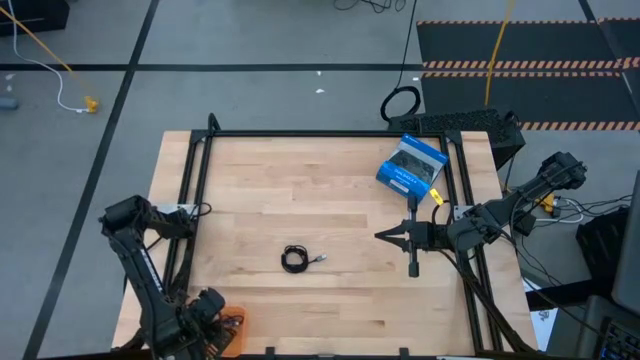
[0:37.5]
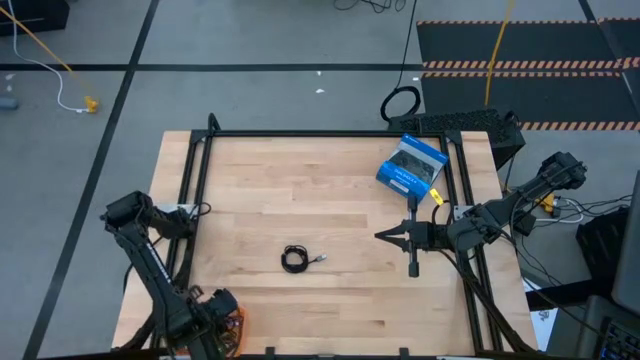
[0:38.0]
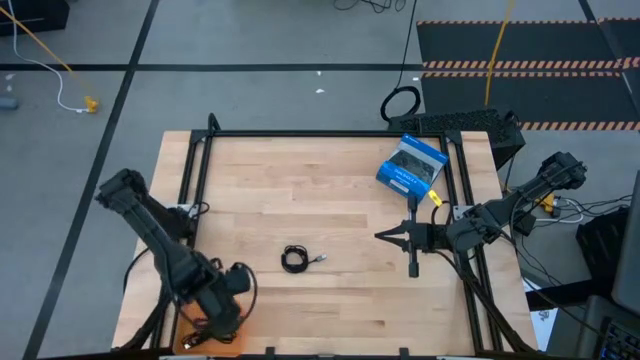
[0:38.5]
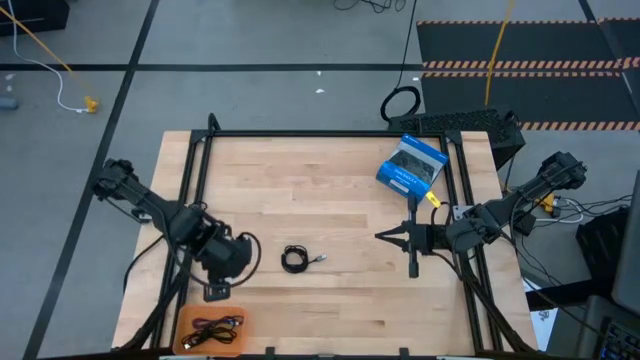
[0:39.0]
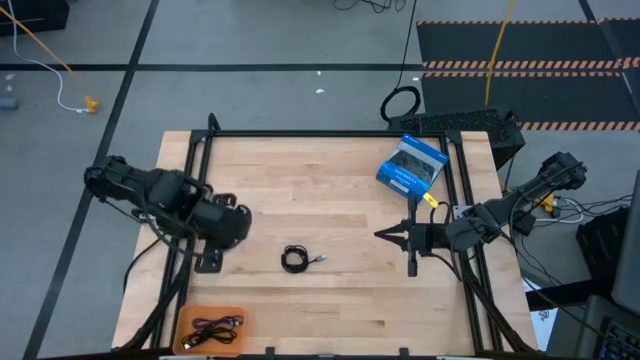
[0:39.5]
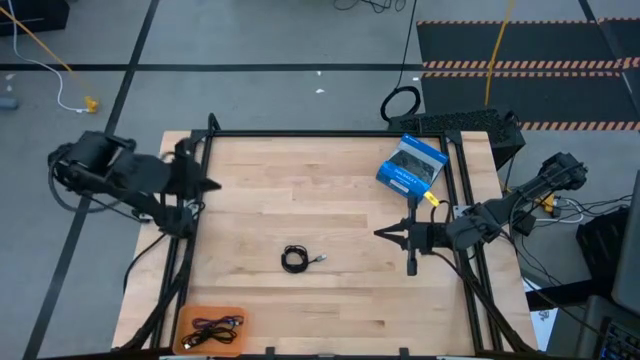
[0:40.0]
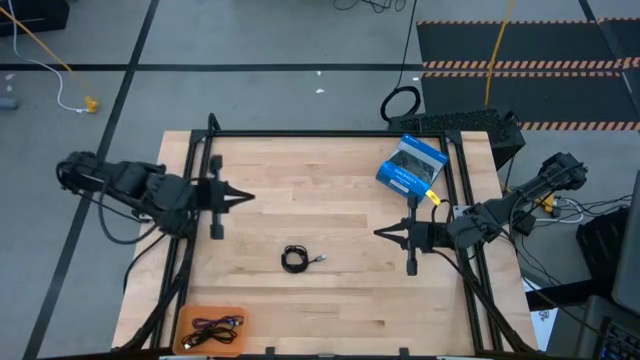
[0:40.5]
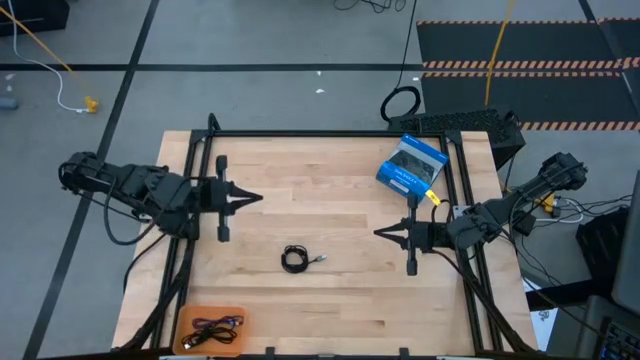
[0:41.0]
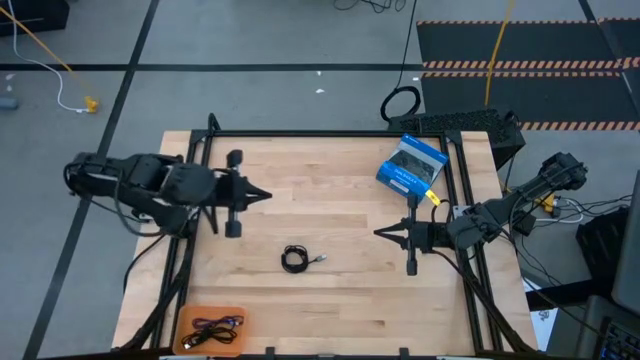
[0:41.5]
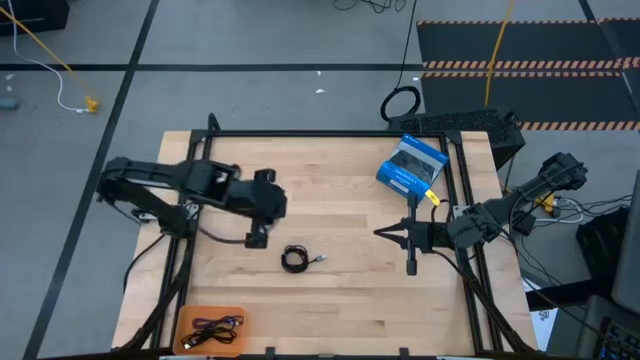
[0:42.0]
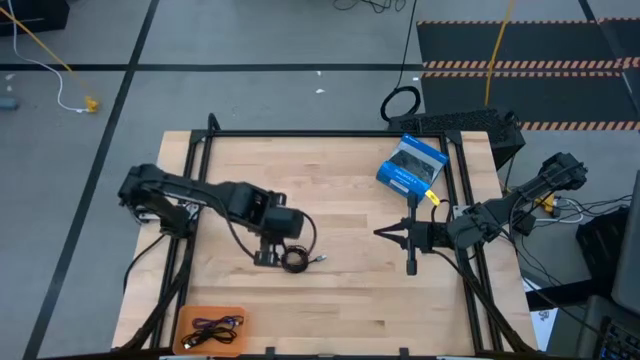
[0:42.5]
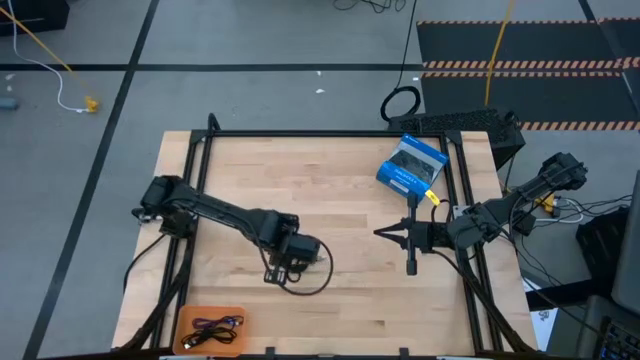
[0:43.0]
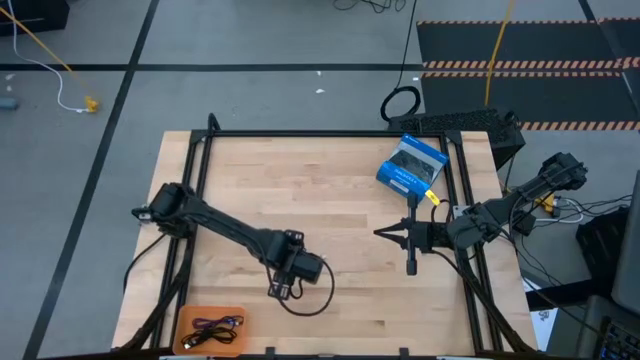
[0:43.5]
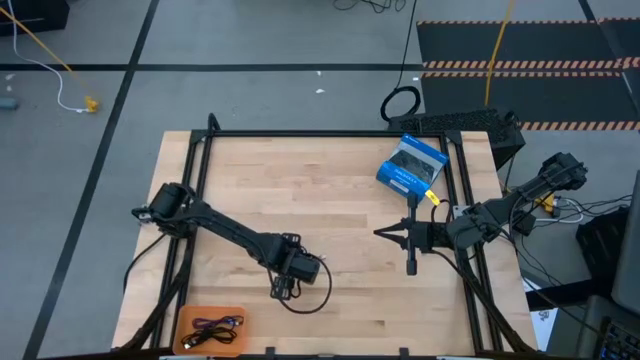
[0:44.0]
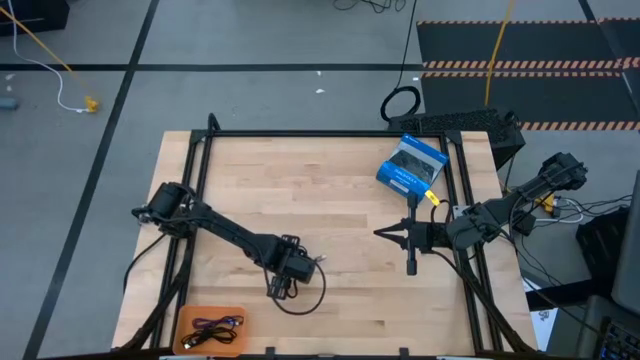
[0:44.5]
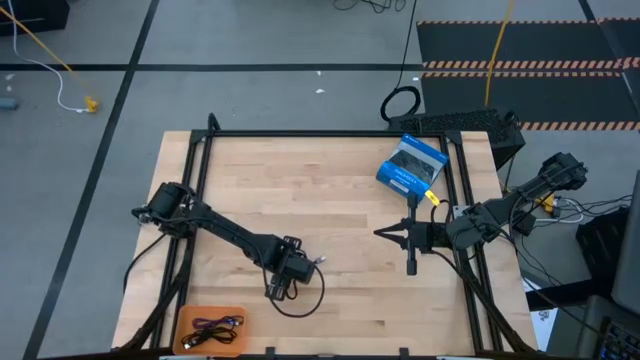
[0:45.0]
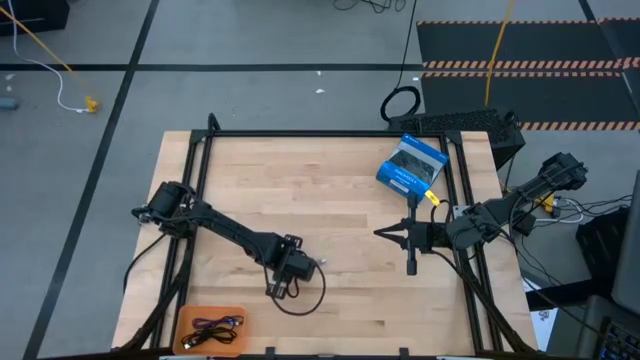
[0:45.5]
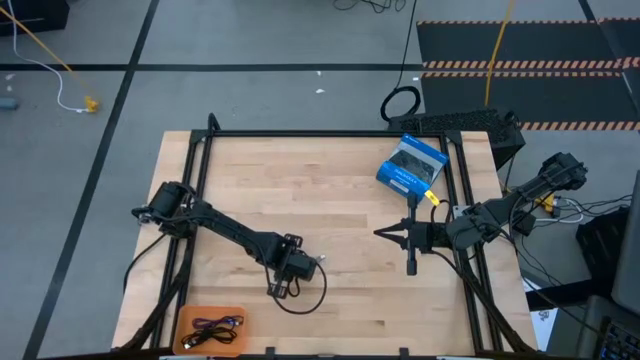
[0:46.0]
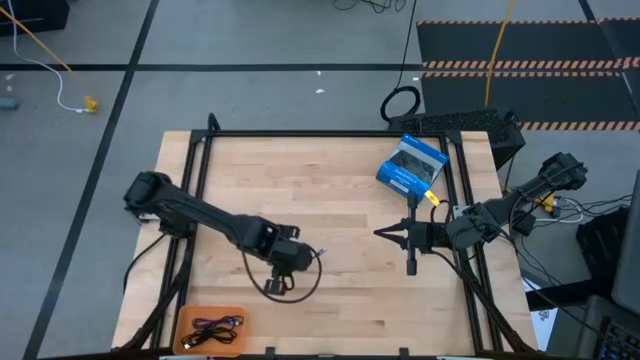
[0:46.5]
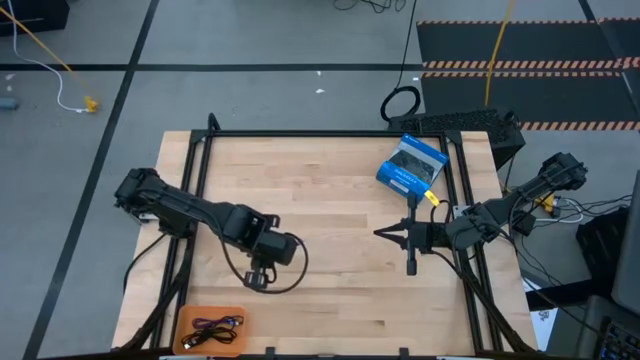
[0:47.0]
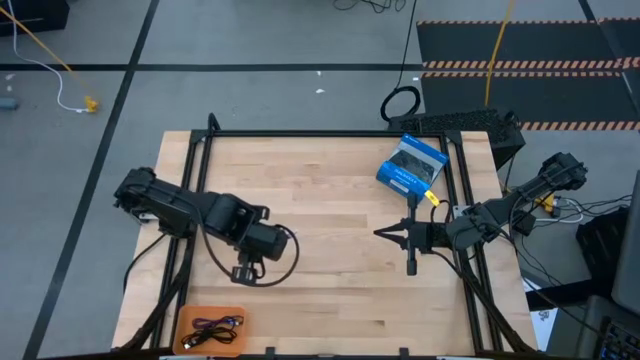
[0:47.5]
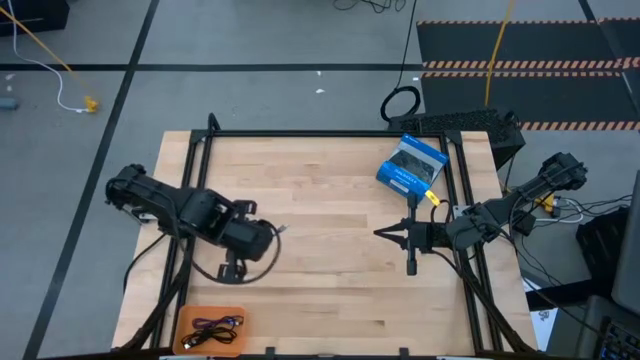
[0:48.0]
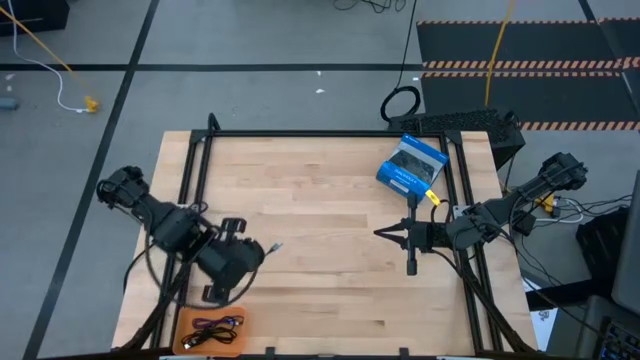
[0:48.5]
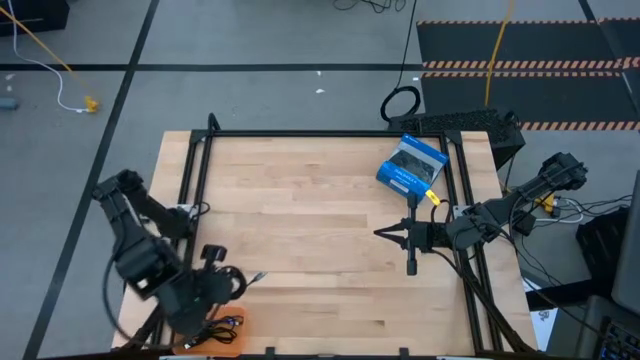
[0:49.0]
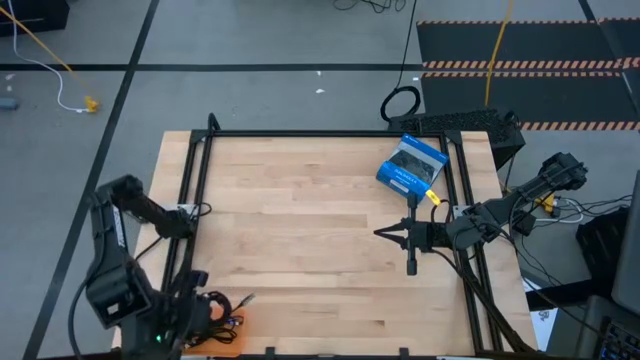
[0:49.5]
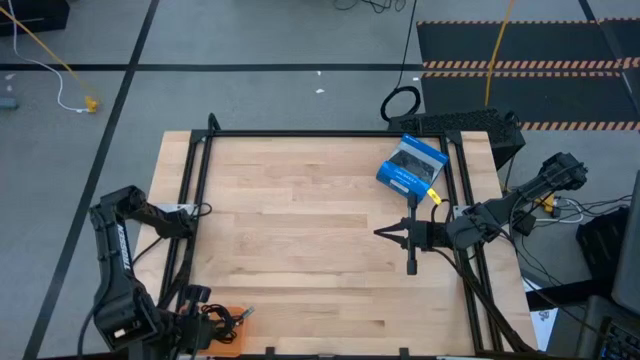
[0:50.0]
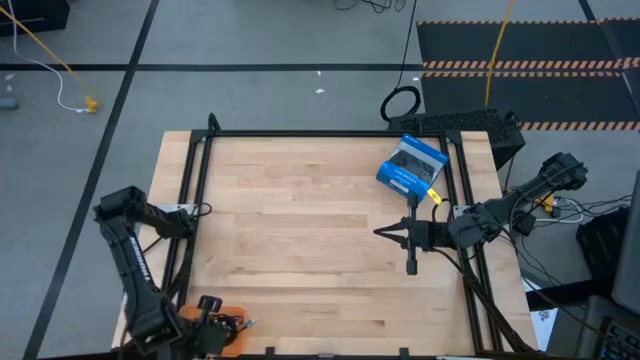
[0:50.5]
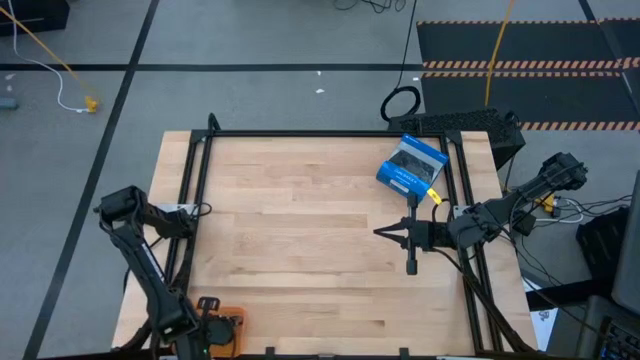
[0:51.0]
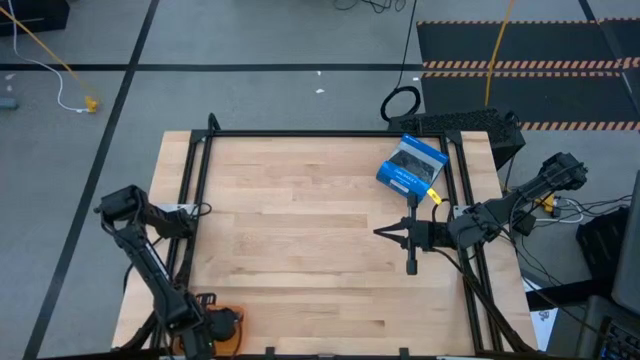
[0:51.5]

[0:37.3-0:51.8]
Task: Pick and place USB-C Cables
Put the black cable charger into the orange bin

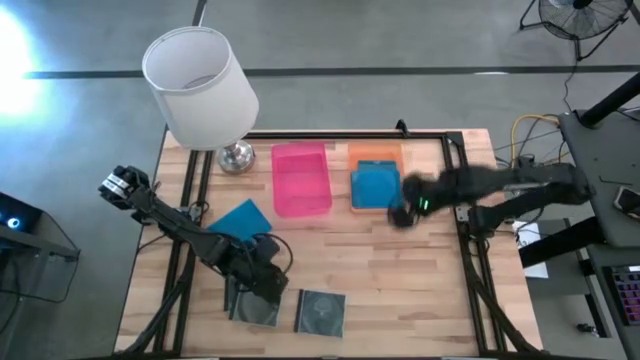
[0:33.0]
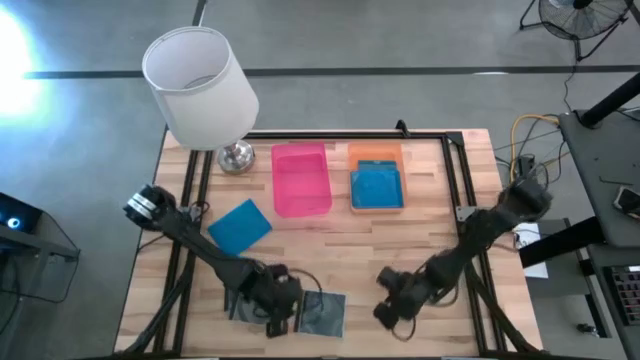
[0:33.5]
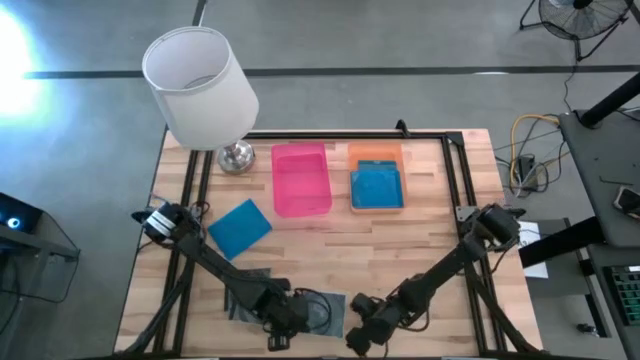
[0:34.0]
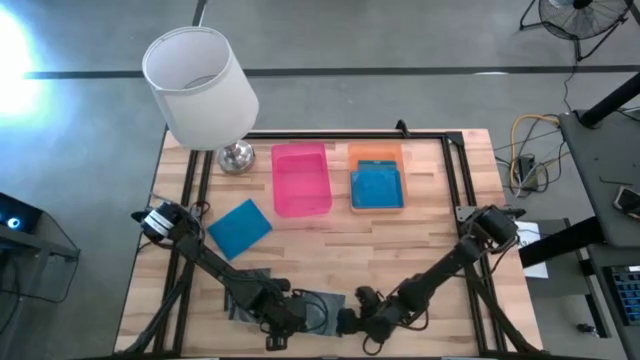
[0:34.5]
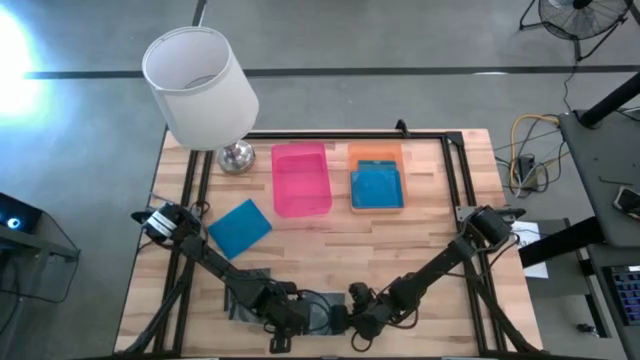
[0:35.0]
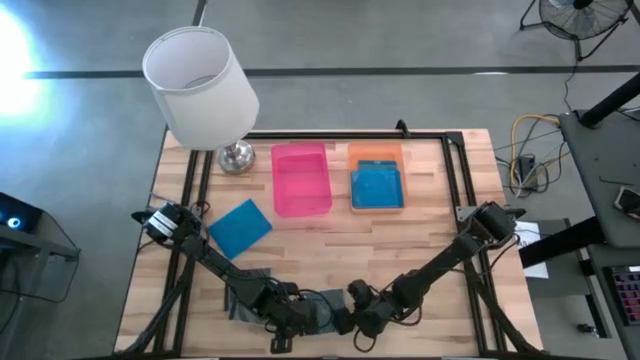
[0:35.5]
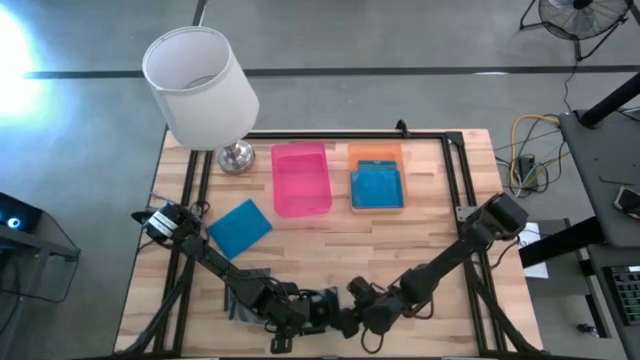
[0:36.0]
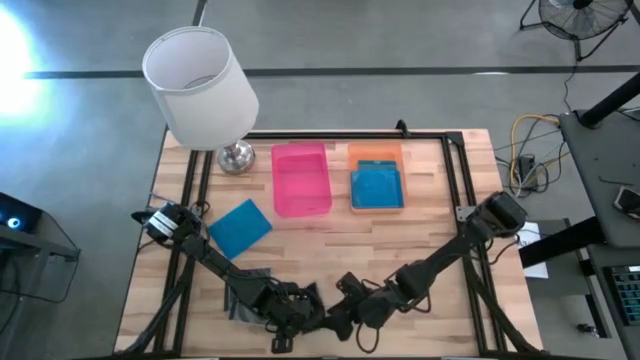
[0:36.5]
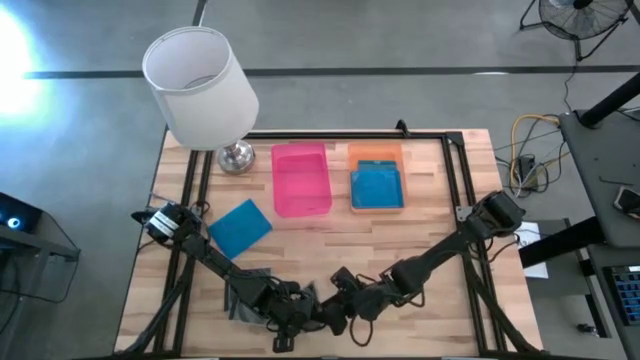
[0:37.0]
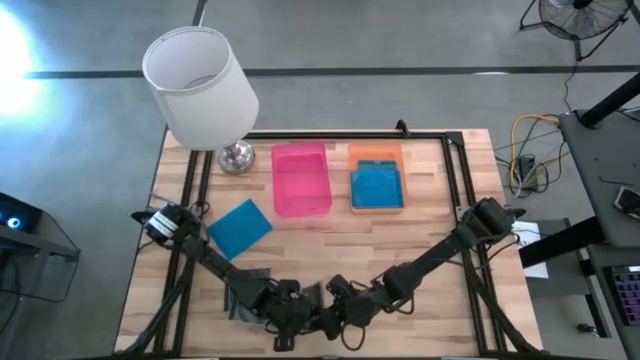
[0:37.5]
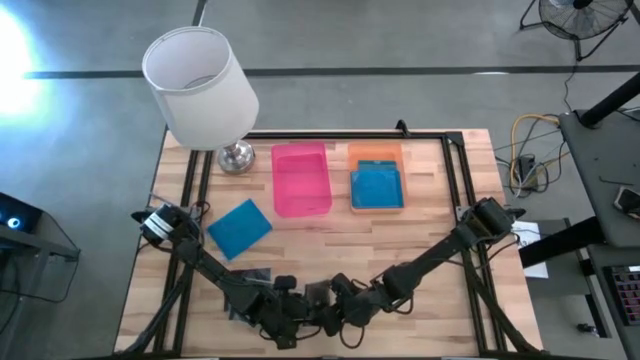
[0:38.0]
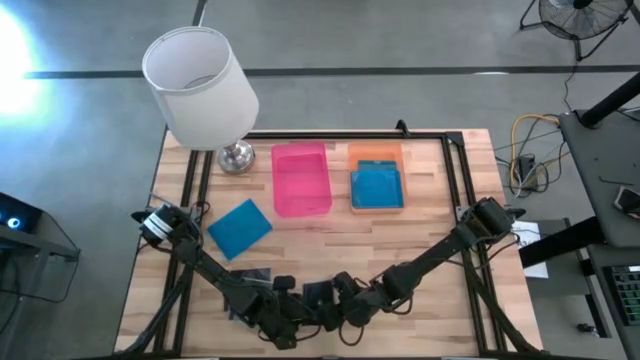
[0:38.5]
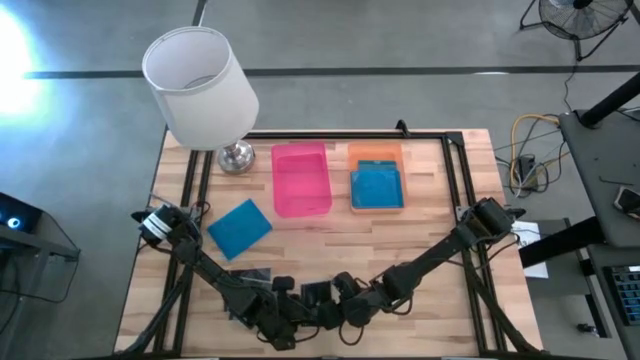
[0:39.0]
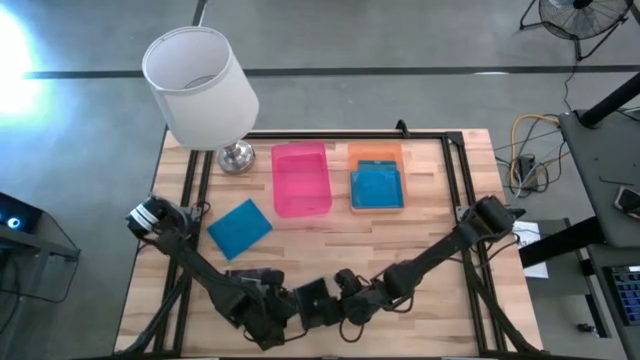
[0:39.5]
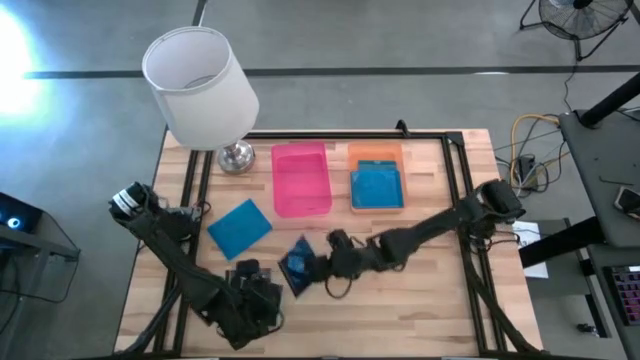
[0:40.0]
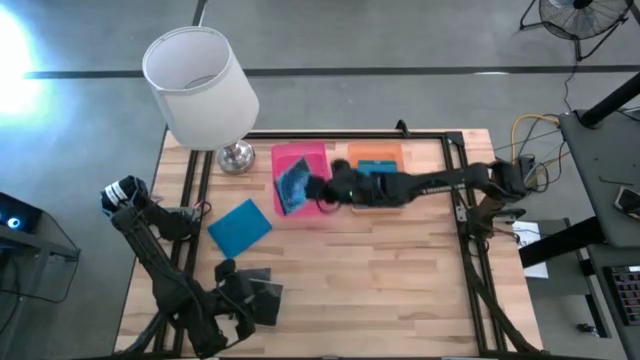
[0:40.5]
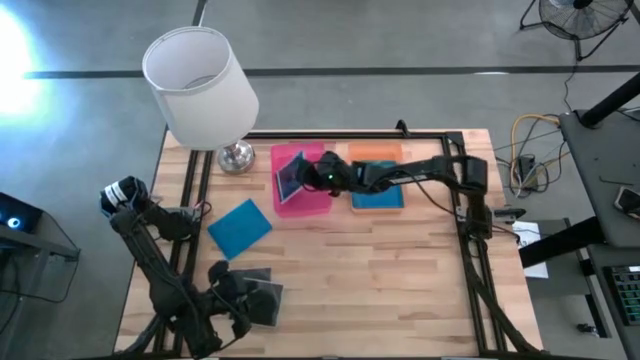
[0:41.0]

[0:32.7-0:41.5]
Task: Pick & place jewel cases by type
Put the black cd case into the red bin
